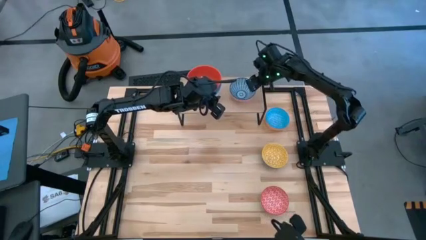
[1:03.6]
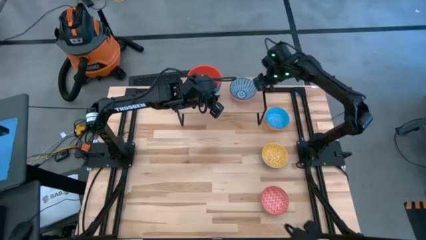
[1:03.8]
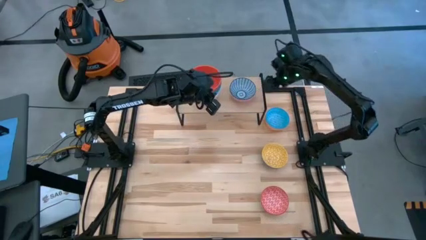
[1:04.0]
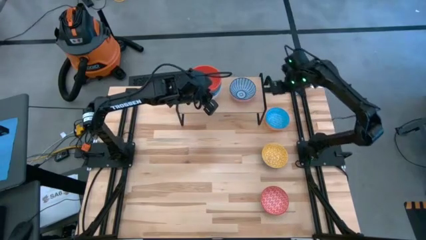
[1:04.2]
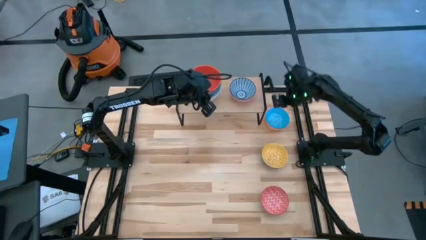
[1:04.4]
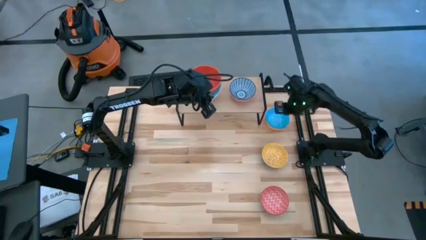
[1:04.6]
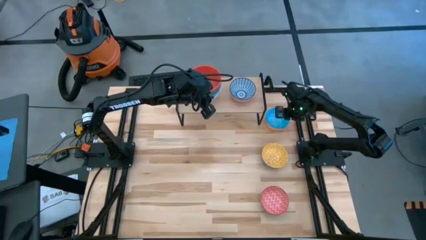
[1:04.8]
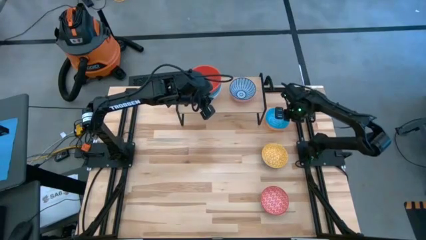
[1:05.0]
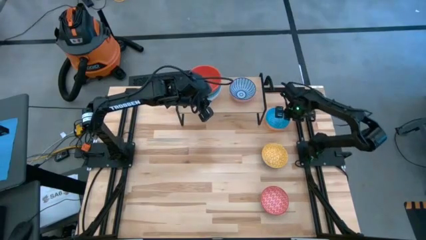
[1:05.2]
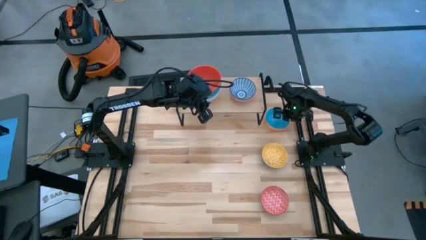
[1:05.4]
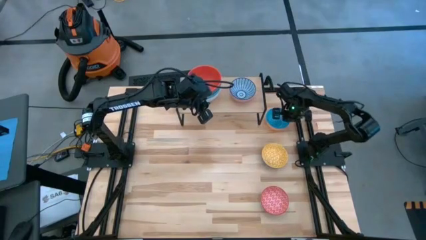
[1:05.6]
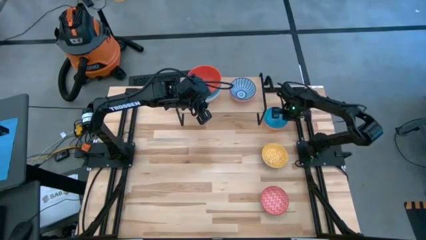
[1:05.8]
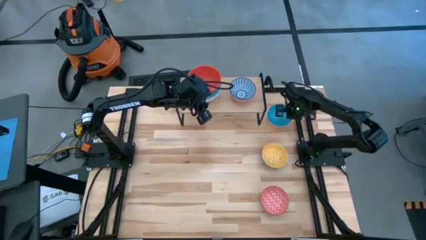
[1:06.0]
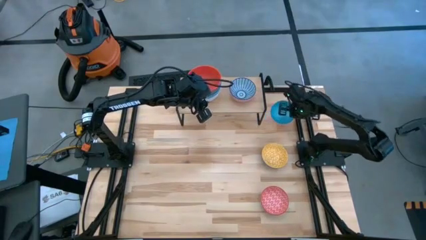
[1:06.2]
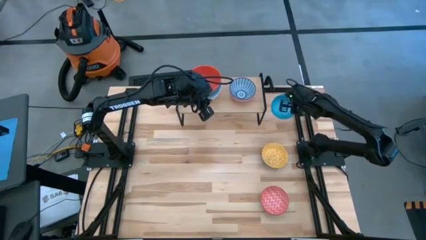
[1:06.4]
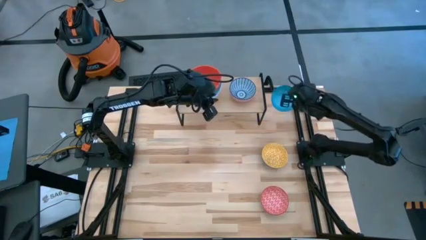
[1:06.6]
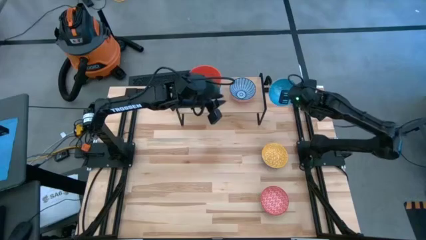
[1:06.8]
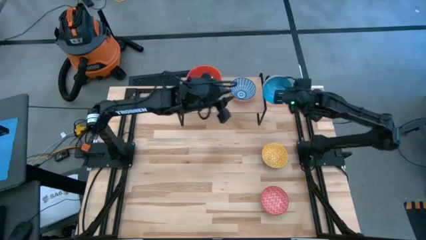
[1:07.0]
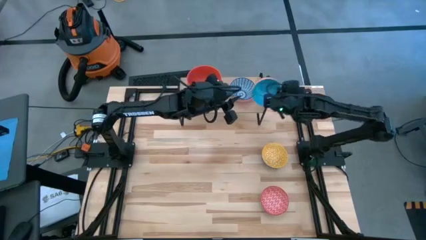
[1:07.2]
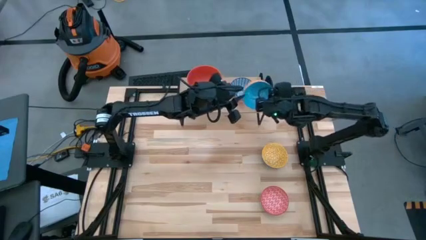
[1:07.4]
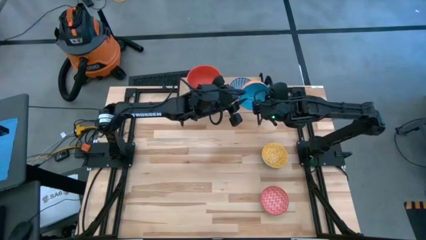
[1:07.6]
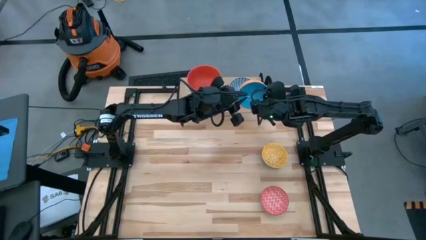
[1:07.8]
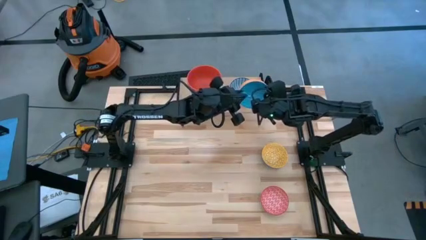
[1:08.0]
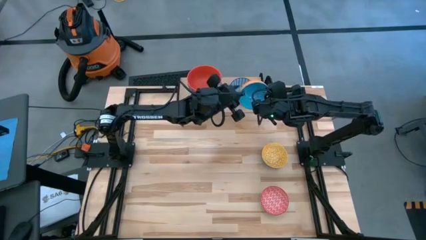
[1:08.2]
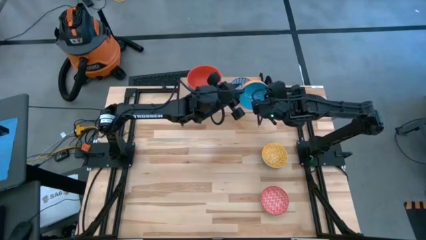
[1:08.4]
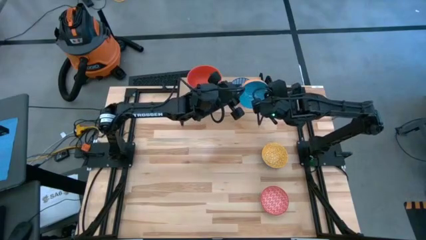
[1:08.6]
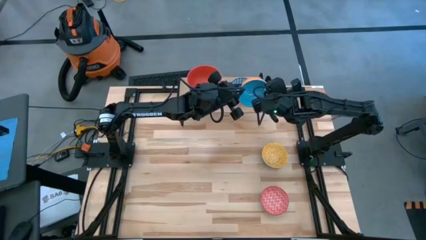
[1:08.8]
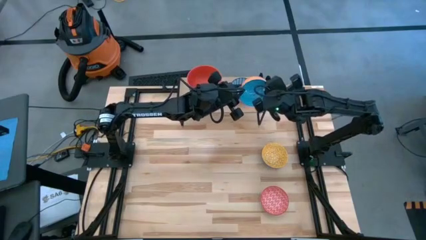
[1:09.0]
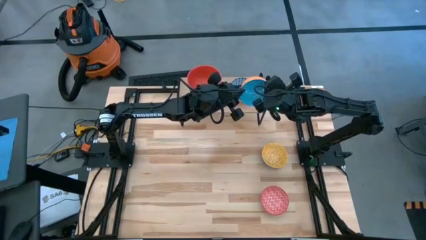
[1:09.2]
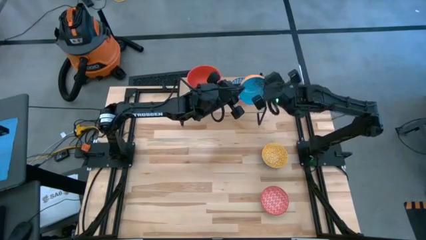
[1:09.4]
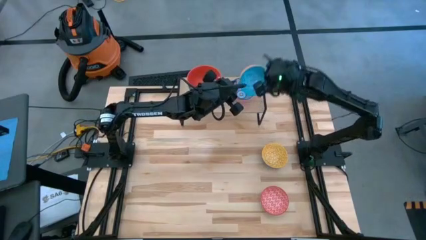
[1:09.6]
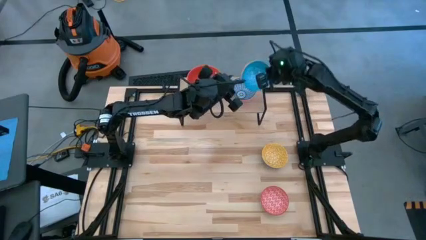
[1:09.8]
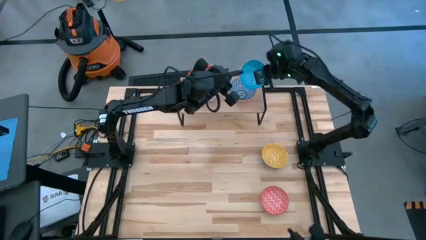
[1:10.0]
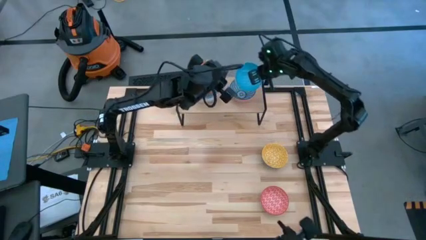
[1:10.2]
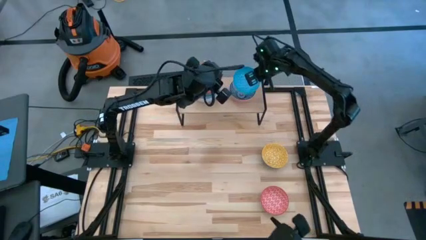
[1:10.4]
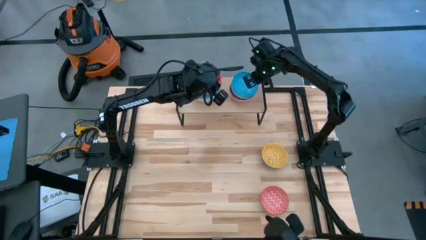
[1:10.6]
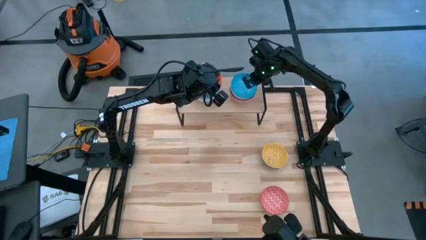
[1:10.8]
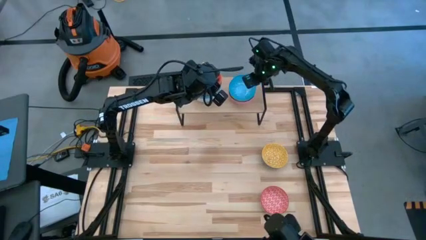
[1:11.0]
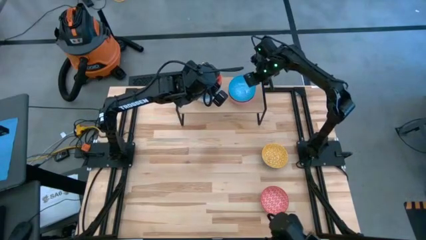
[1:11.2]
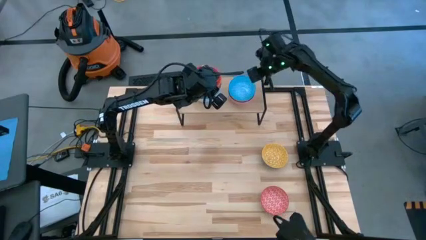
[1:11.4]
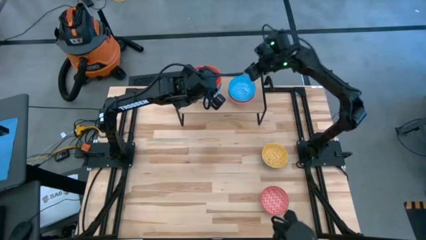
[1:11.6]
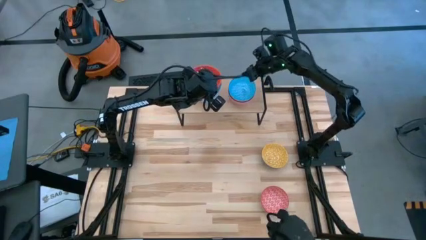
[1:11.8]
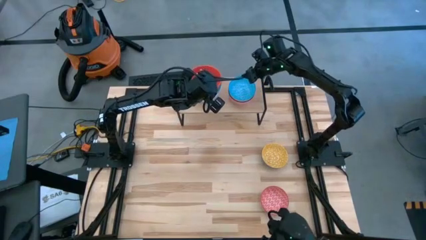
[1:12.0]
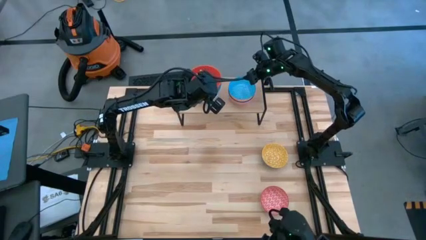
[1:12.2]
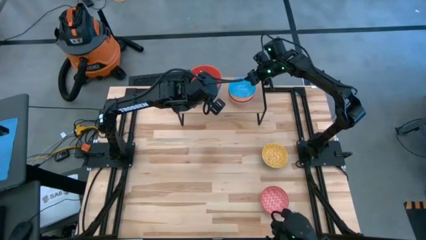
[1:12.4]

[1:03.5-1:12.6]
Task: Place and stack bowls onto a shelf
Stack the light blue patterned bowl on top of the blue patterned bowl on the shelf

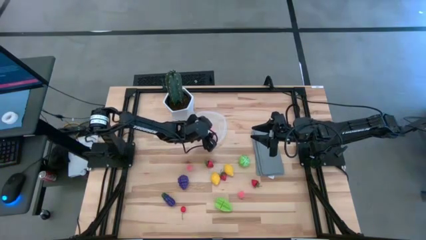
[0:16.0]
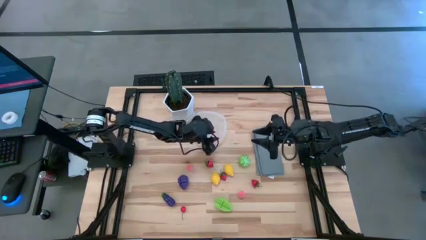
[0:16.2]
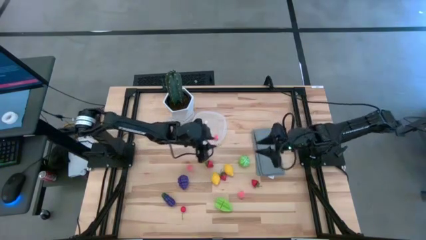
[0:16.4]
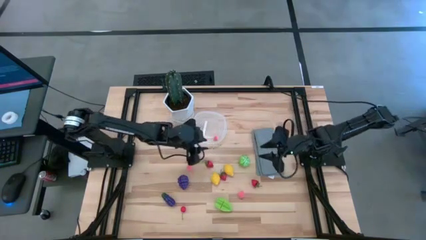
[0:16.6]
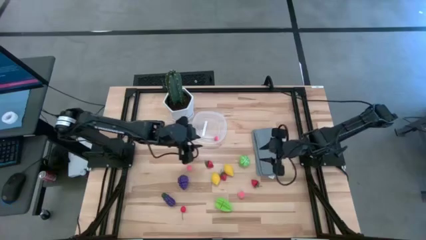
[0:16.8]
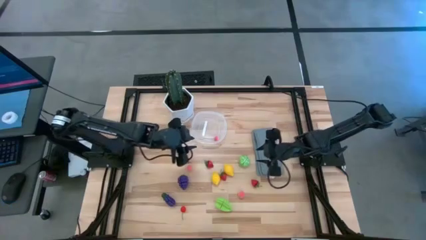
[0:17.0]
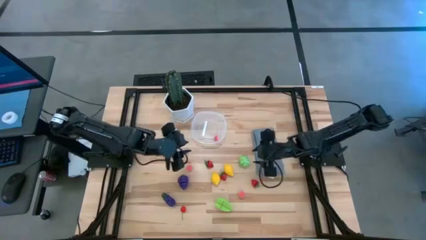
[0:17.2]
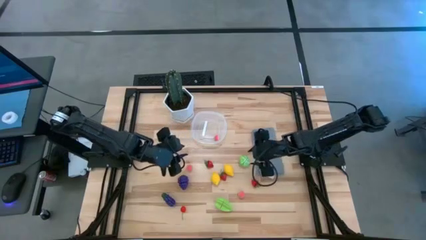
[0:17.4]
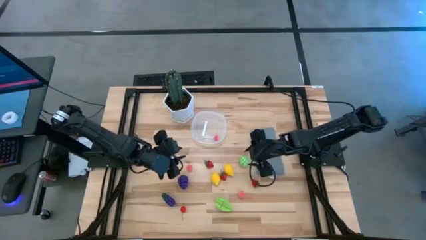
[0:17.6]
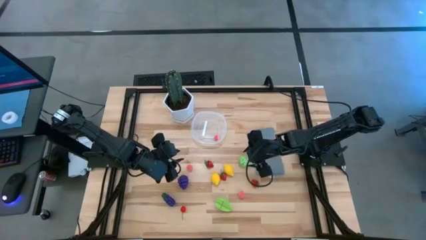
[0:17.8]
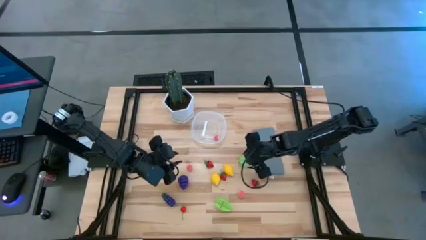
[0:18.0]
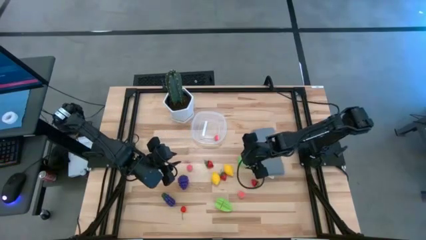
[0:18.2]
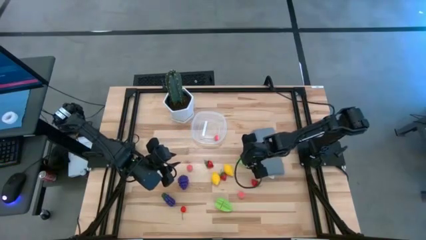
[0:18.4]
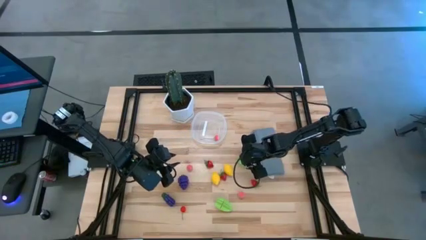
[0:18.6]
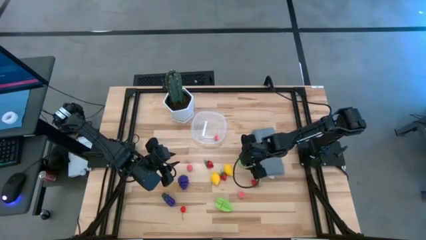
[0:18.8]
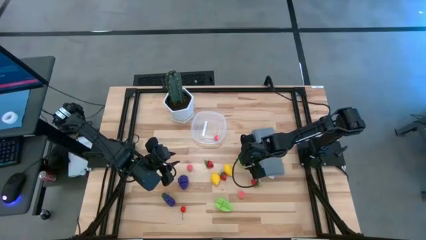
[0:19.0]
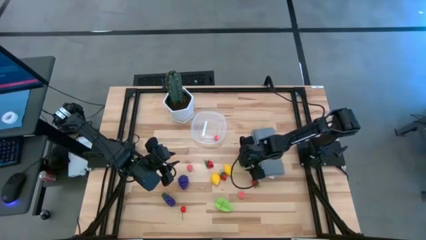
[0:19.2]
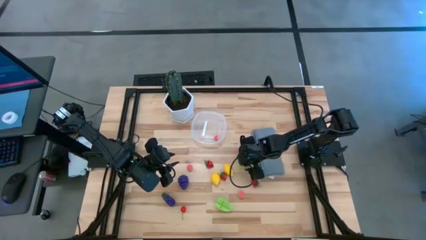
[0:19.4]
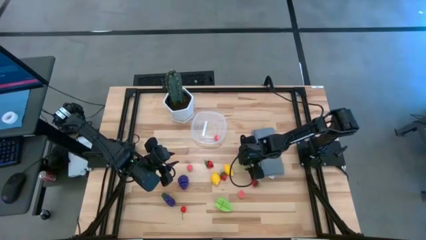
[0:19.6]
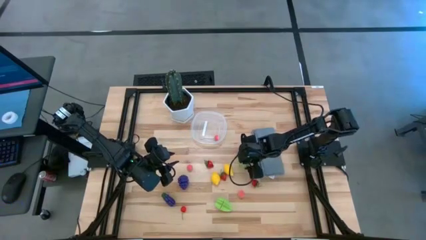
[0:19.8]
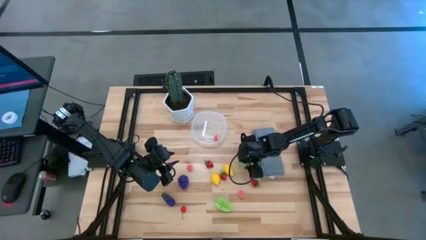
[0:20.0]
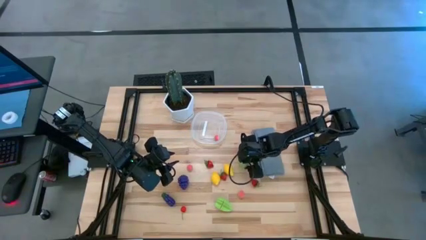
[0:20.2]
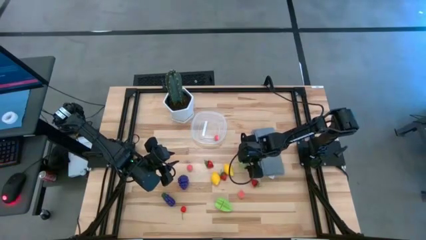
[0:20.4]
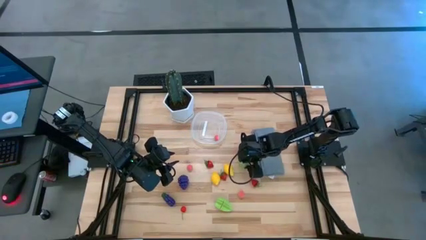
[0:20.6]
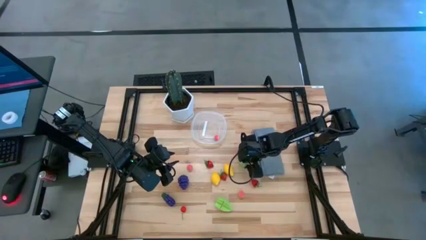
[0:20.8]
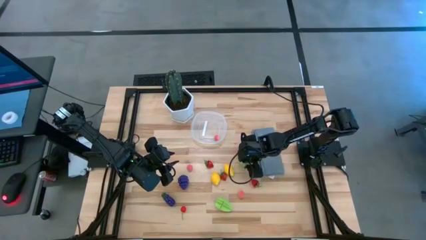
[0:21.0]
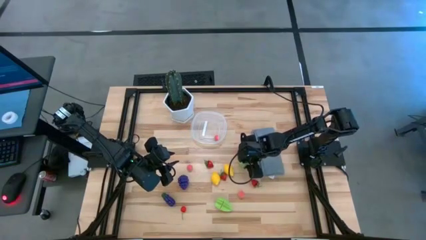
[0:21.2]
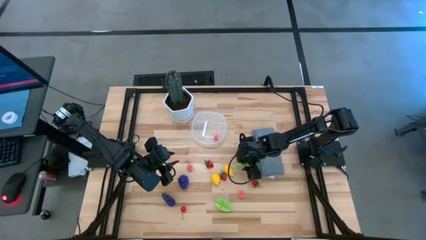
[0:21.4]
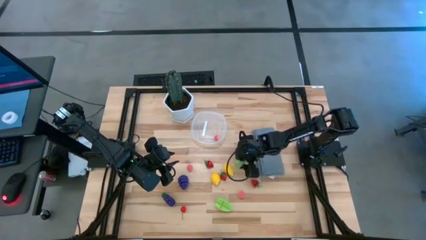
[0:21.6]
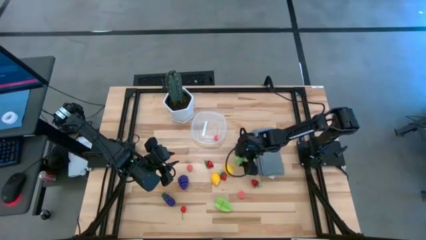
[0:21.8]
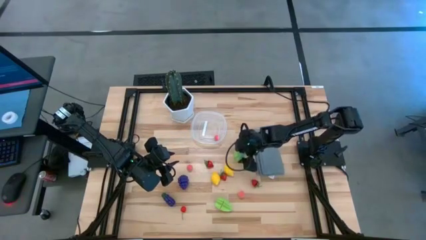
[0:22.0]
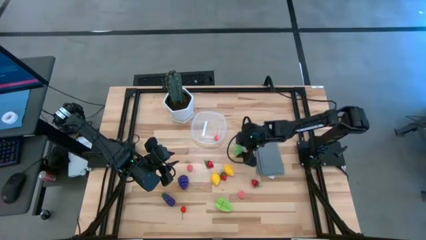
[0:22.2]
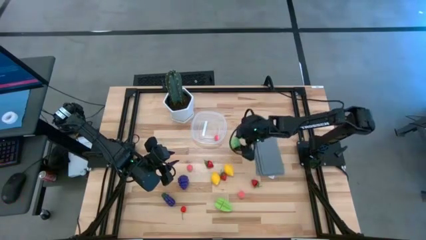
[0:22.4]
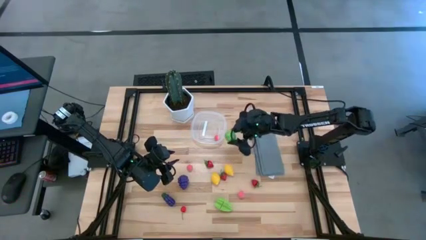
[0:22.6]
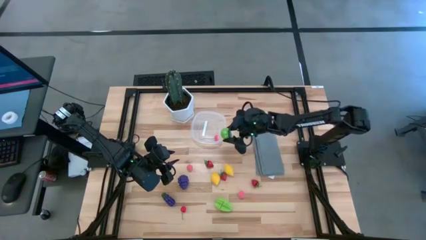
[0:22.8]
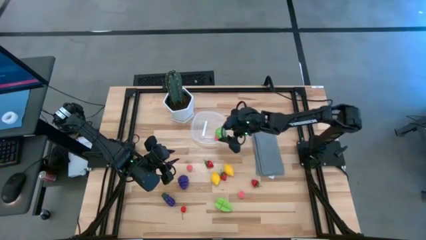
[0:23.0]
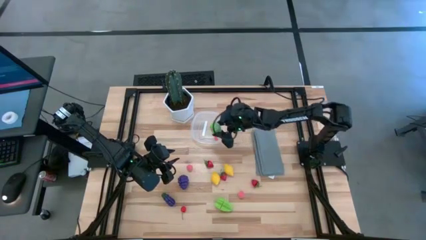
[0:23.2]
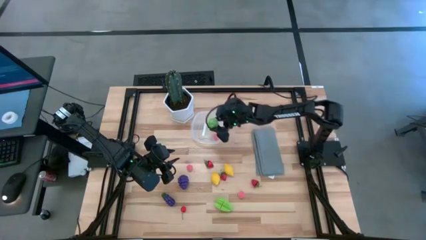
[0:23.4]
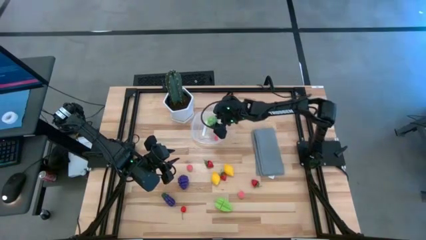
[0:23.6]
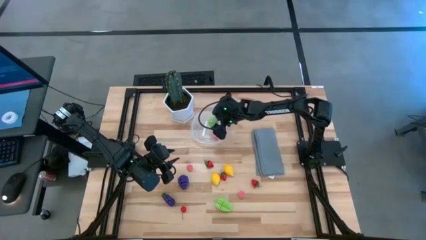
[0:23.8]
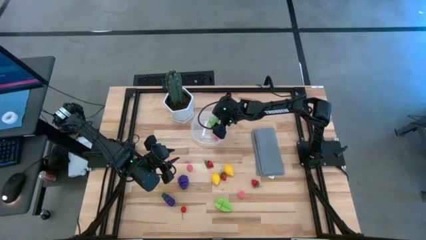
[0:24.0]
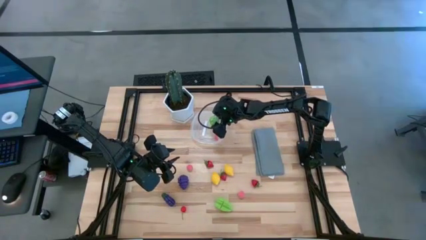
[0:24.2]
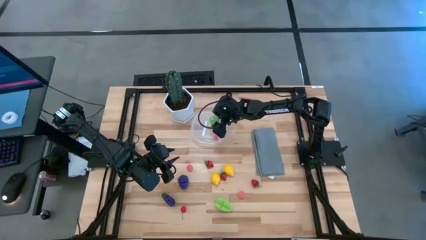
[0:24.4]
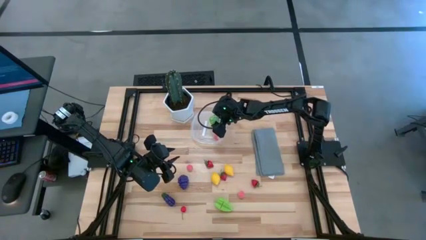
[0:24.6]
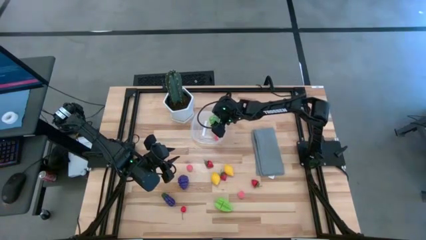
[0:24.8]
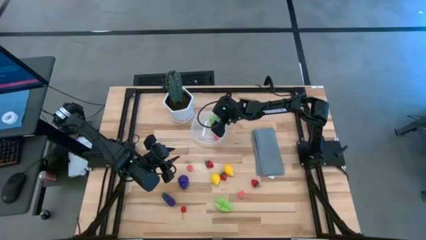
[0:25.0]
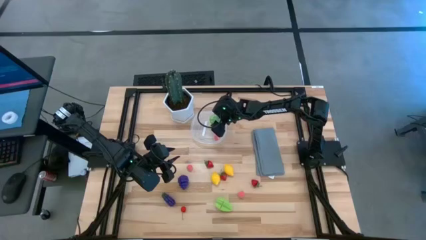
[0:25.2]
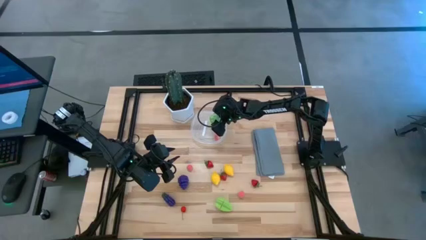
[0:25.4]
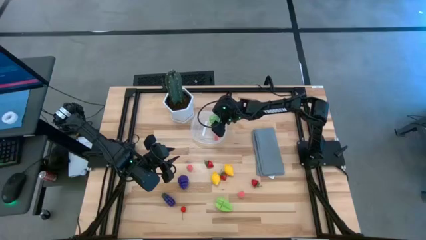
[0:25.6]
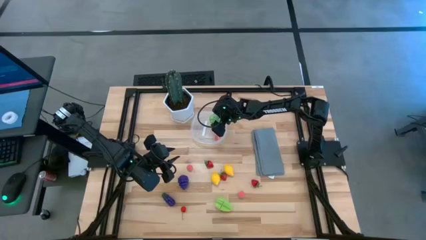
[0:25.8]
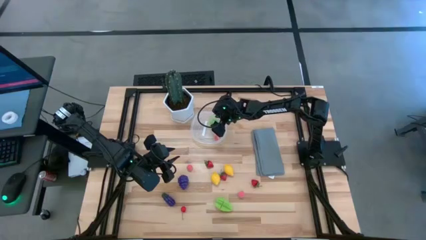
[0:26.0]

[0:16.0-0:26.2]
Task: Pick and placing Produce into tupperware
Put the cabbage into the transparent bin
